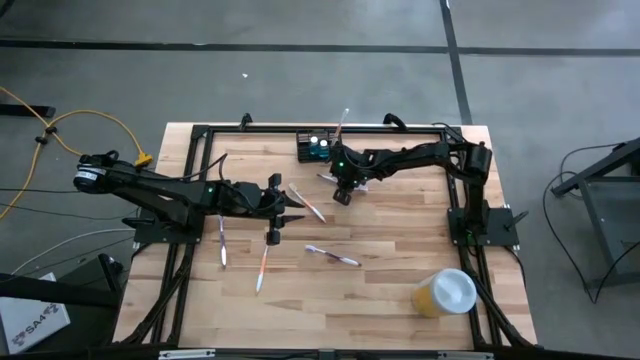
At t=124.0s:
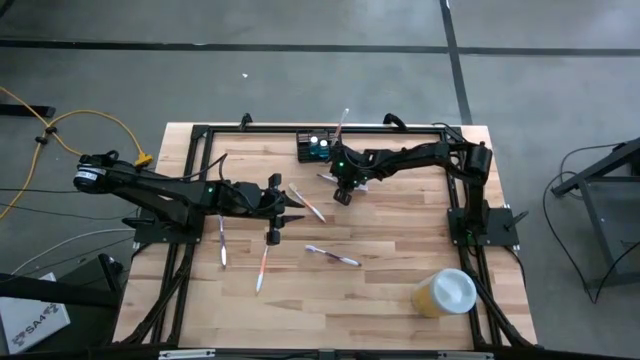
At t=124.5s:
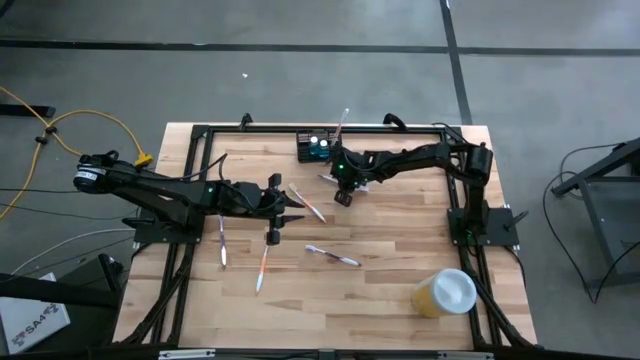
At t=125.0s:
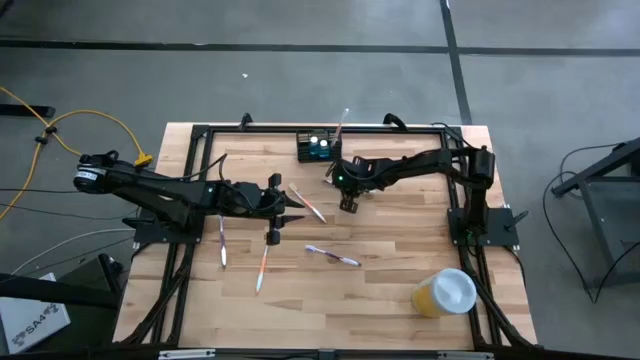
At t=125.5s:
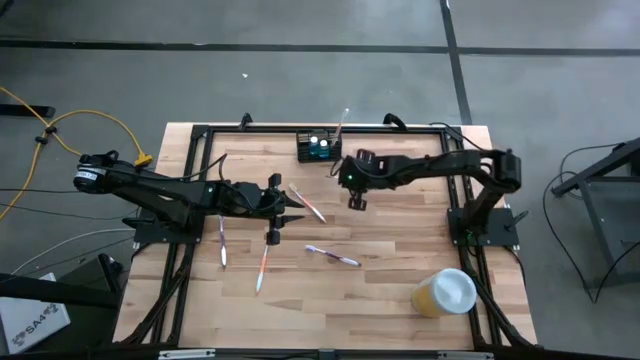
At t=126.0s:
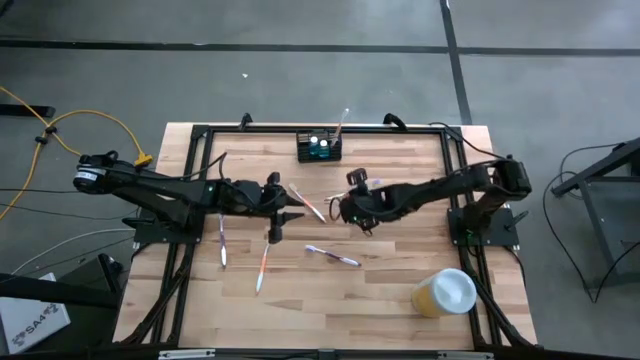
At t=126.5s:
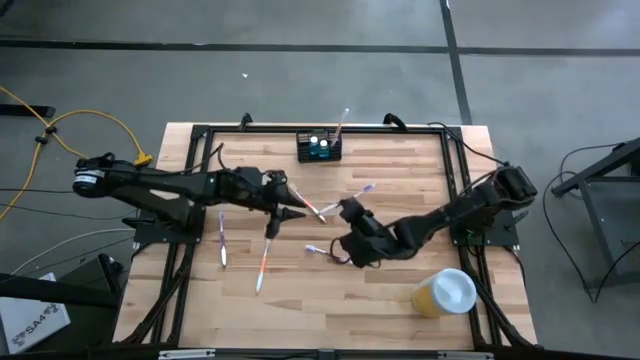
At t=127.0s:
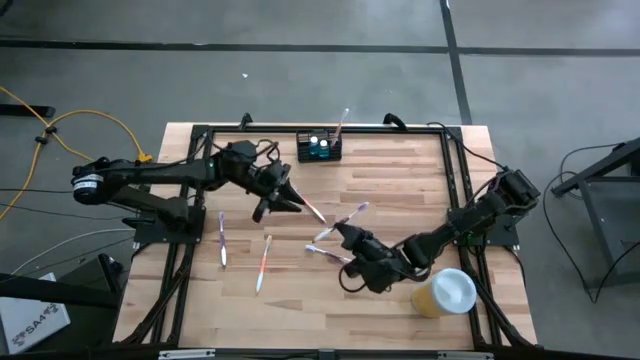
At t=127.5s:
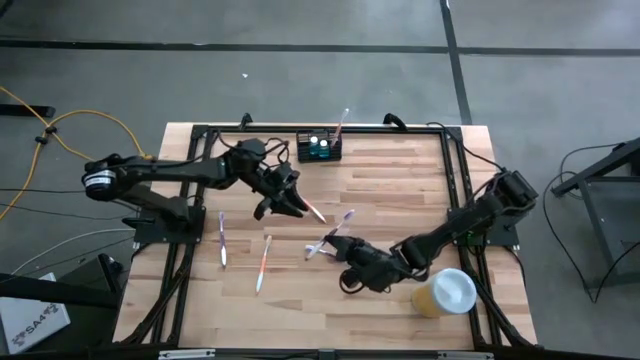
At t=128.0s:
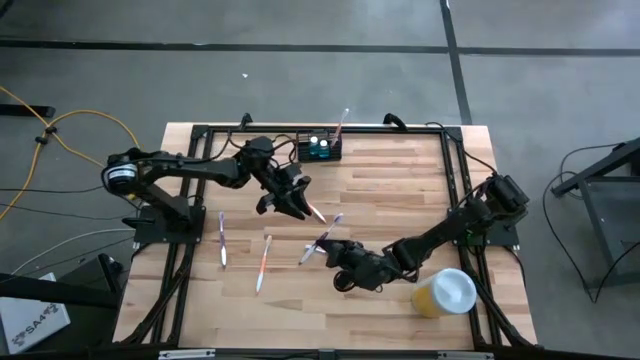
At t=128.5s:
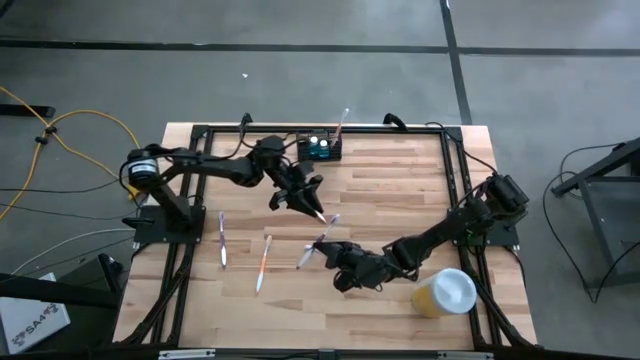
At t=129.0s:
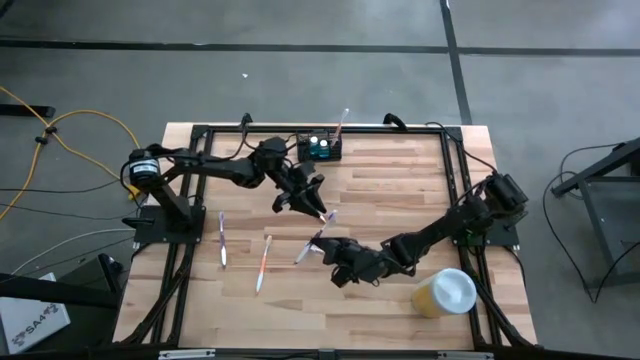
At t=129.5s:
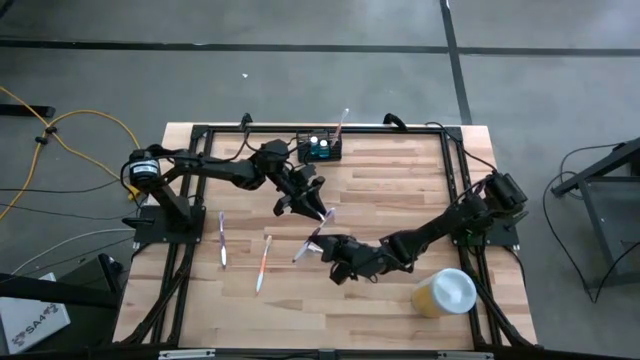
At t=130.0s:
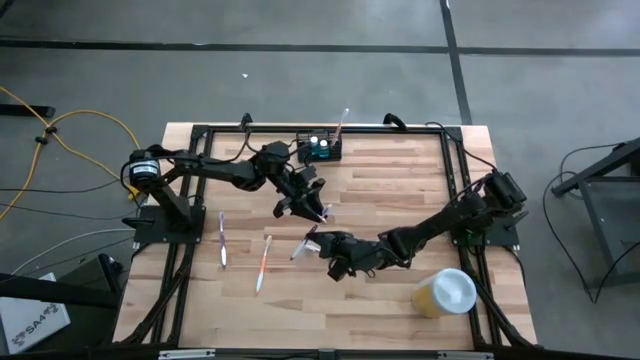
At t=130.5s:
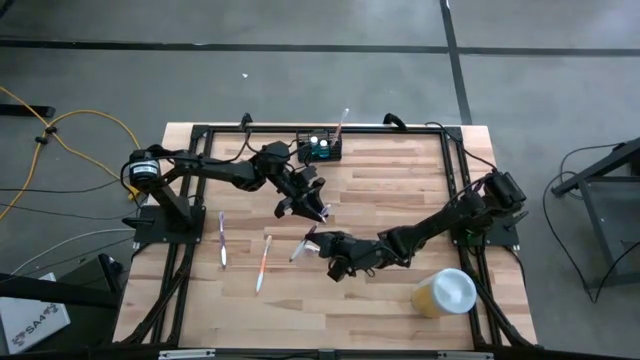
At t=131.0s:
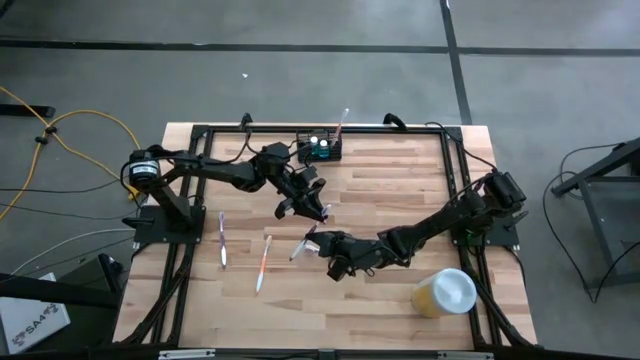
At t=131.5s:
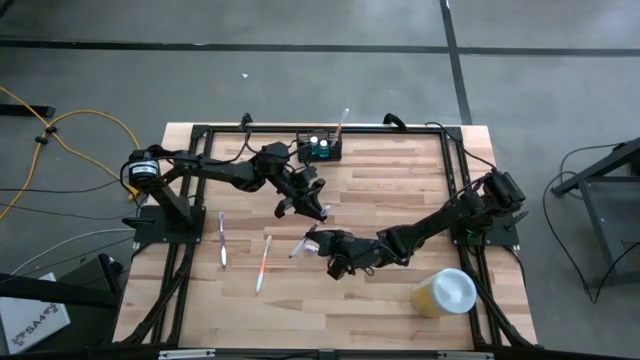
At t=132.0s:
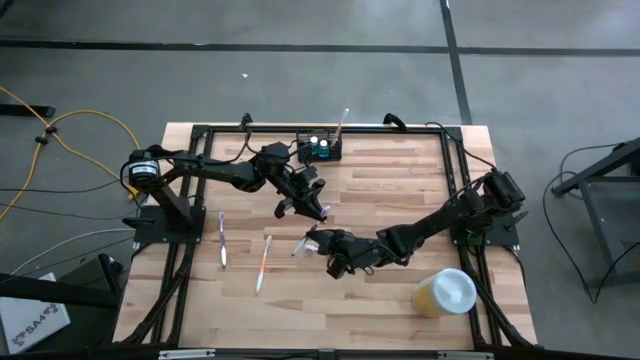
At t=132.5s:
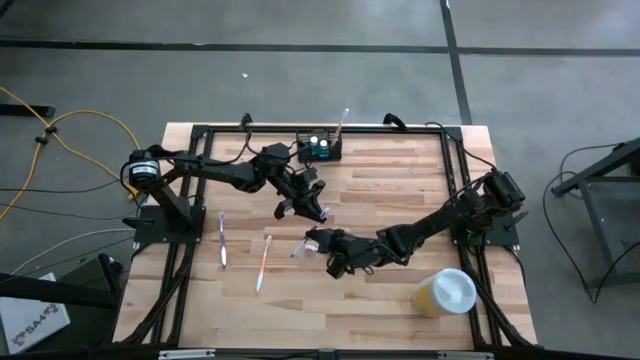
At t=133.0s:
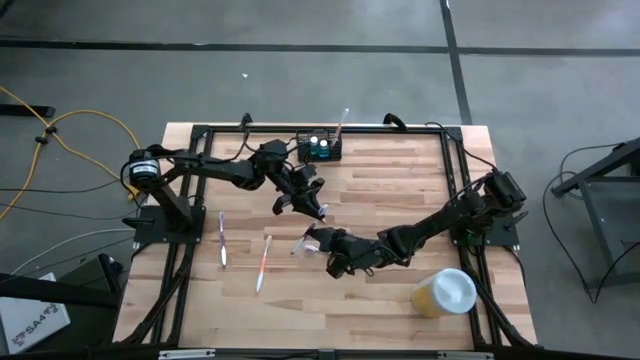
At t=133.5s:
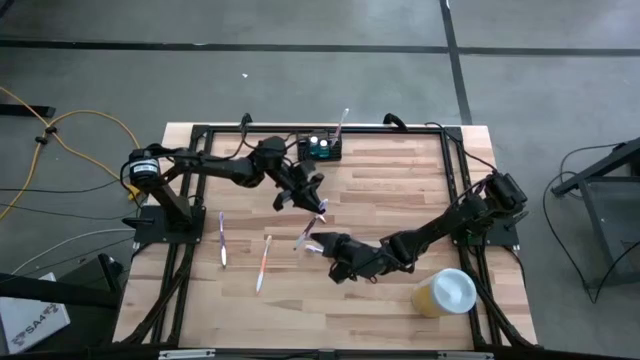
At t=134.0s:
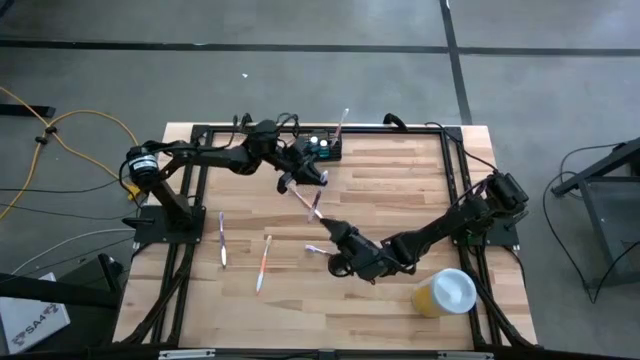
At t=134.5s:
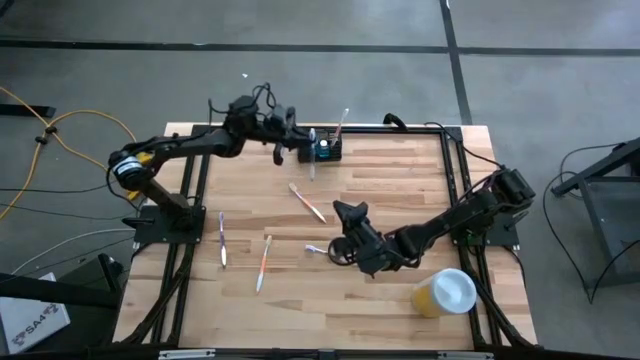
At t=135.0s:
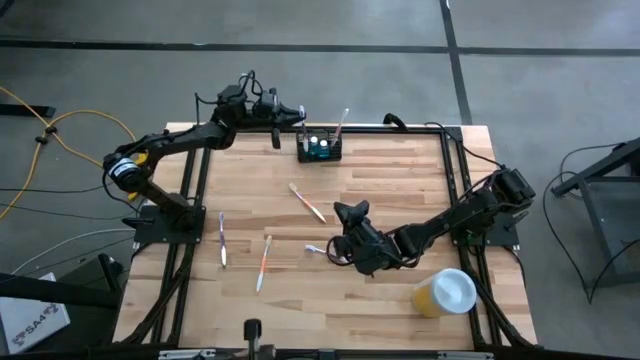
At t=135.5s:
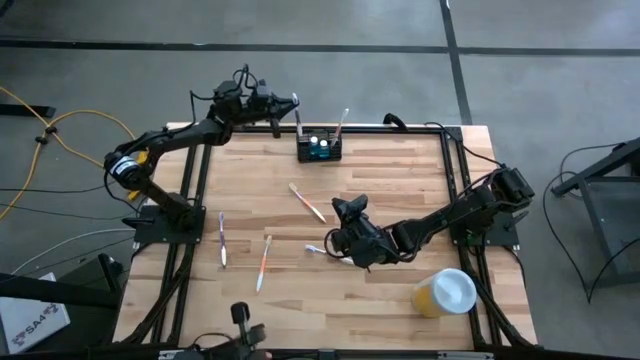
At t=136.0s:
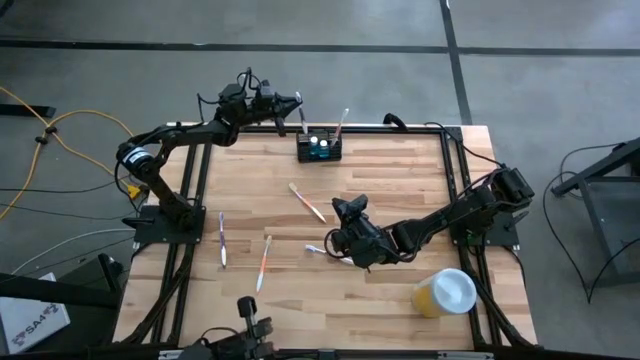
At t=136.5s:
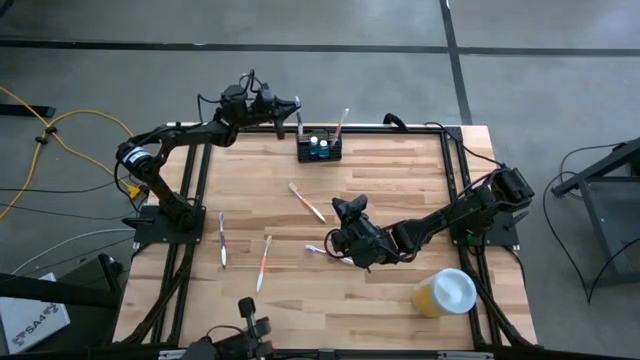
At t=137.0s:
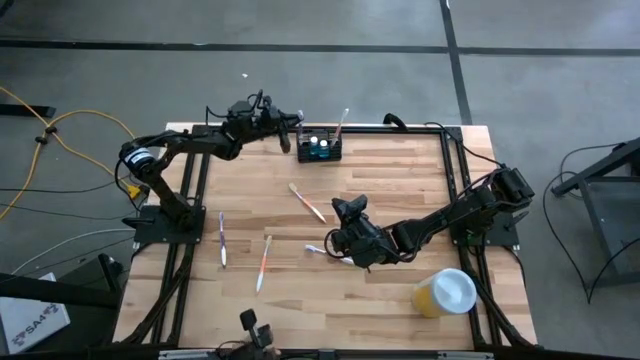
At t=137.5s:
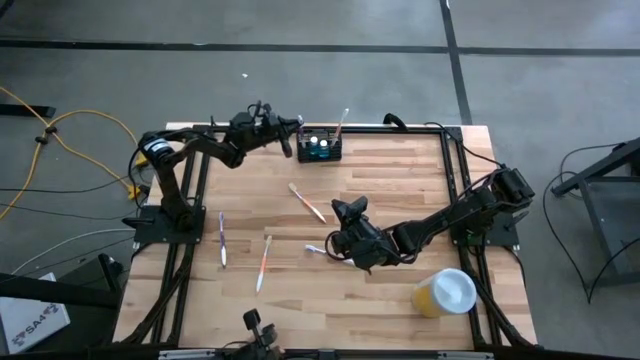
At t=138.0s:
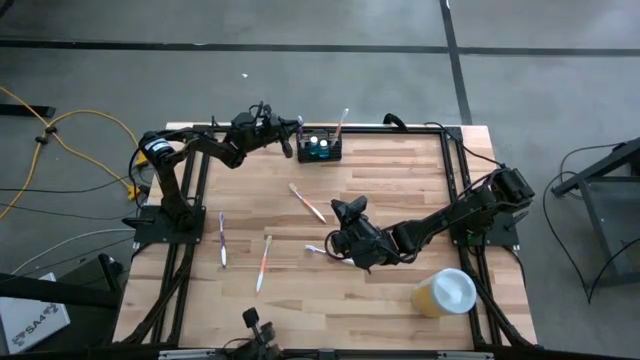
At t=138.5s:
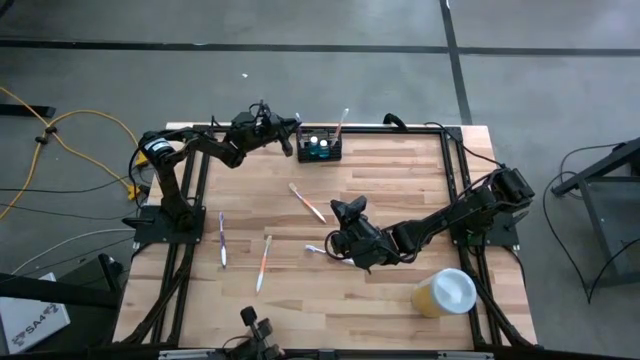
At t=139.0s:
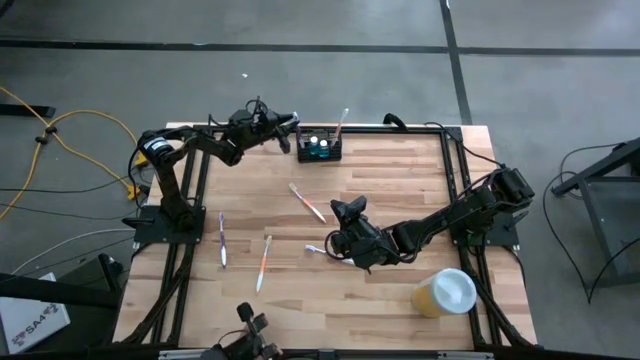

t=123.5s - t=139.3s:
Task: Pick & Place toothbrushing station
Put the top right purple toothbrush into the wire organizer

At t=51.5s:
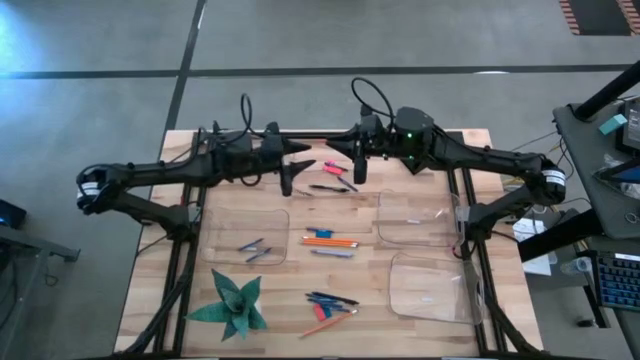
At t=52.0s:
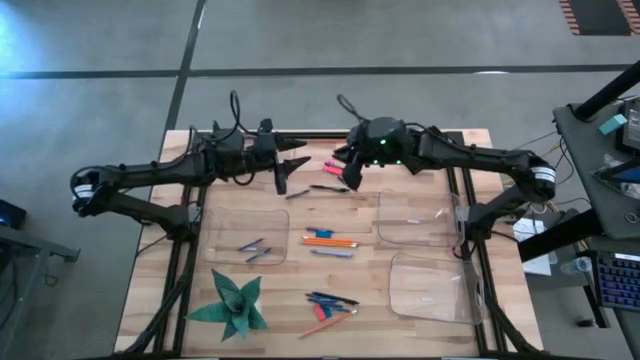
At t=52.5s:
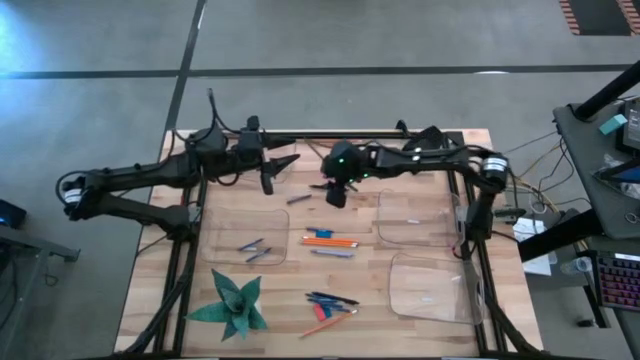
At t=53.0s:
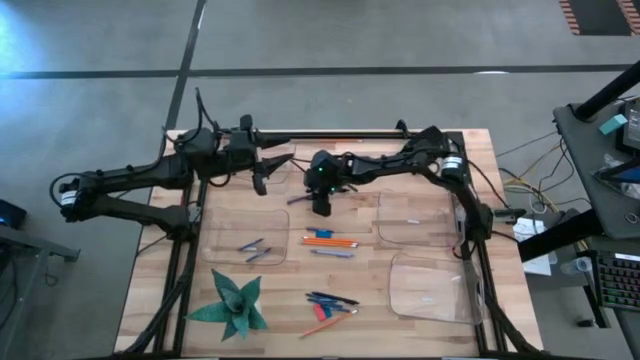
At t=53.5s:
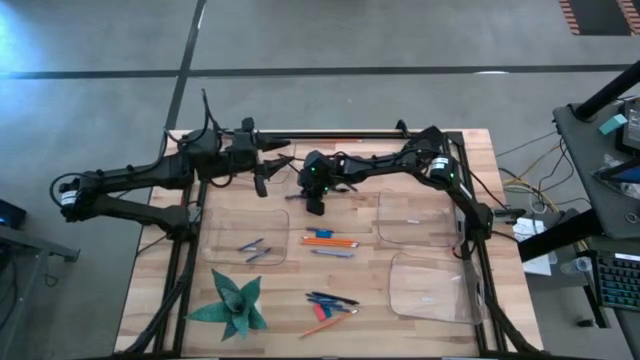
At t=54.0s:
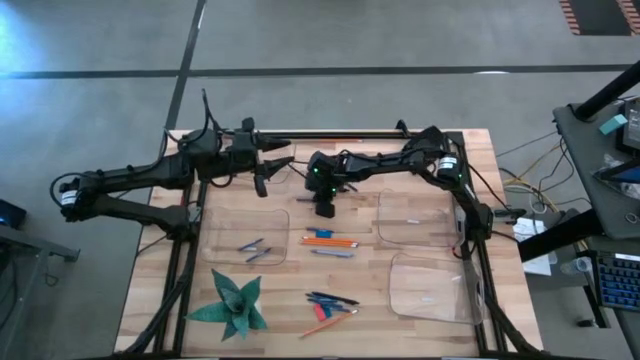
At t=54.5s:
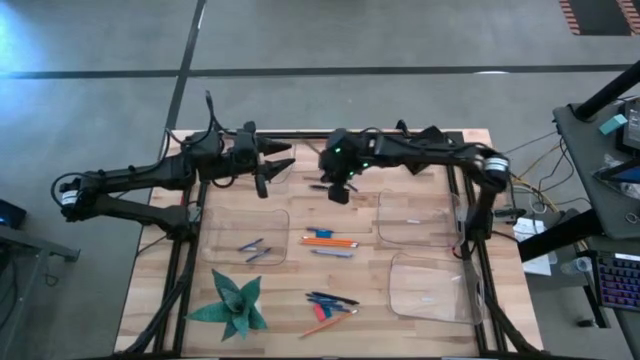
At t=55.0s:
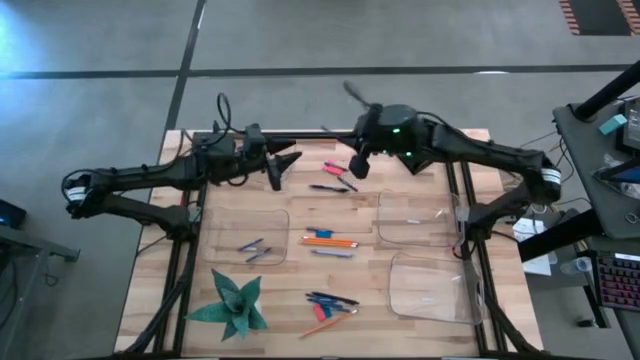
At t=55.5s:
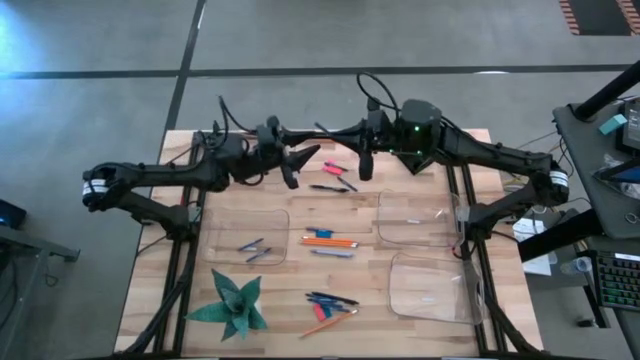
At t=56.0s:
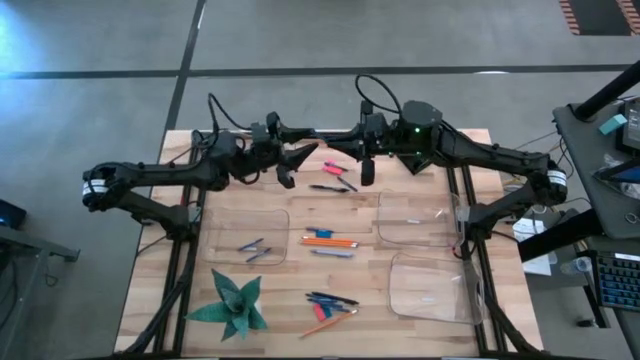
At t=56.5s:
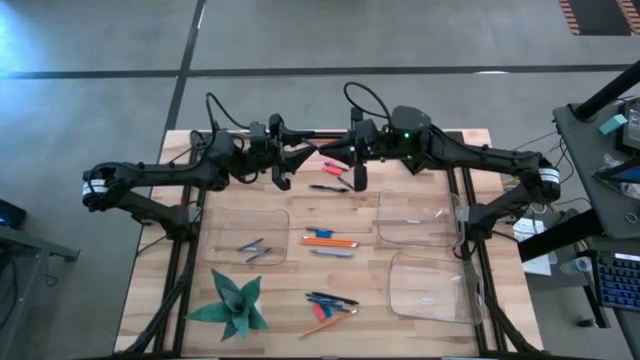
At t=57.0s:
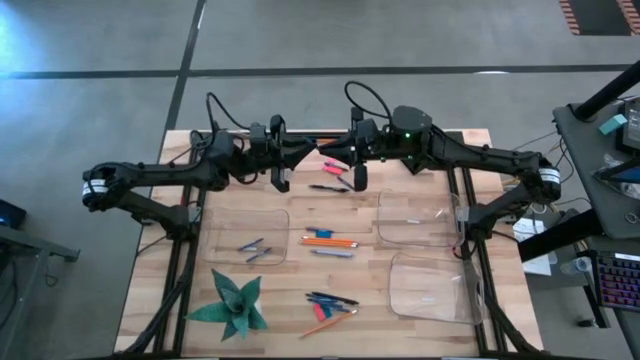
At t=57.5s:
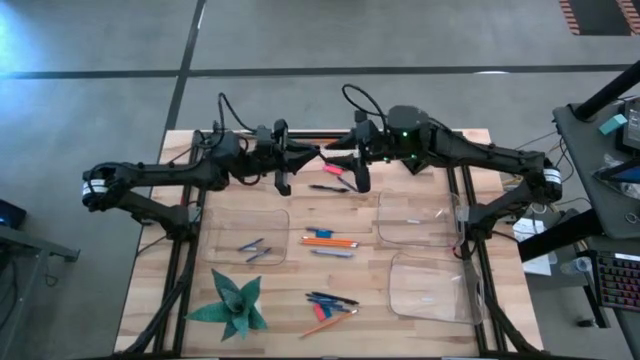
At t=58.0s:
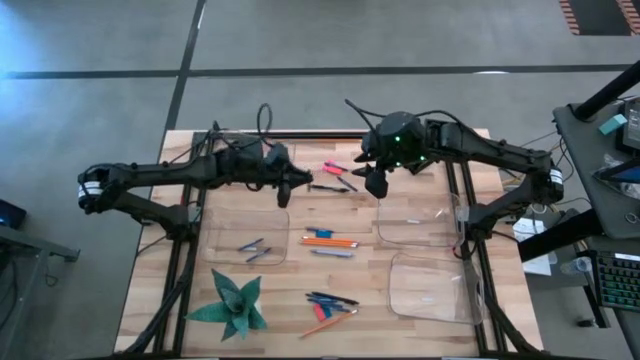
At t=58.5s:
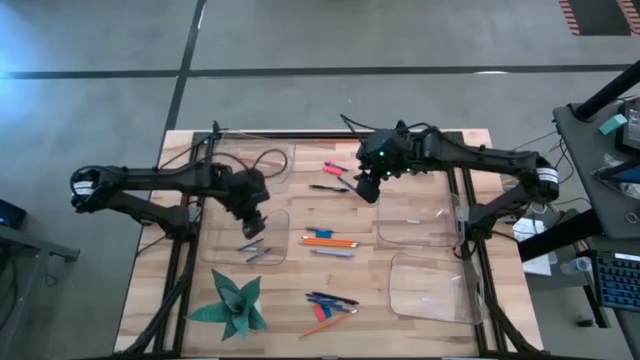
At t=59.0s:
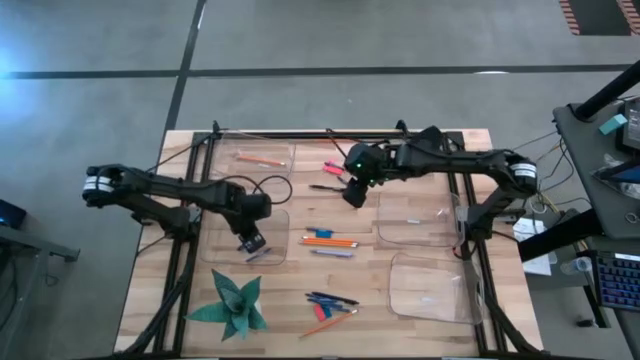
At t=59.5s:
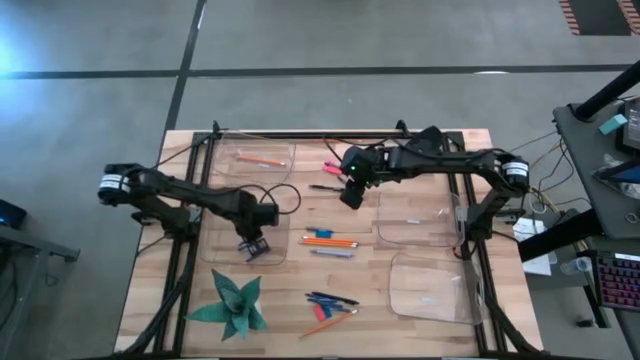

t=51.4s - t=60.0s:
Task: Sort crayons/erasers/pens/pencils in bins
Put the blue crayon into the middle left transparent bin
